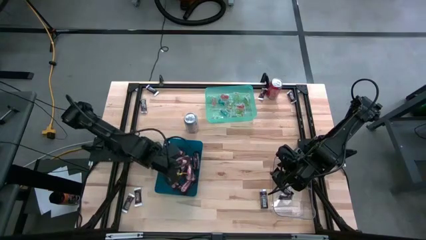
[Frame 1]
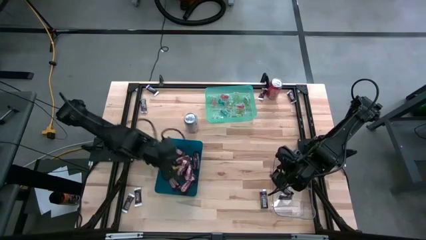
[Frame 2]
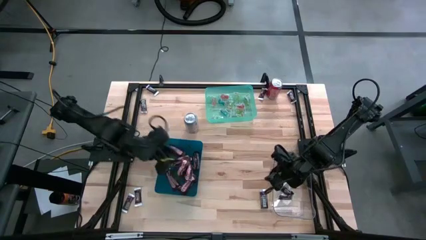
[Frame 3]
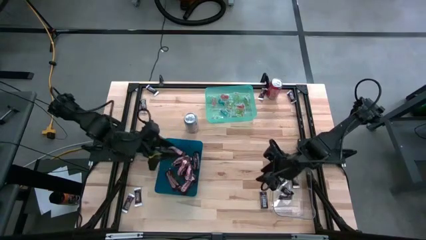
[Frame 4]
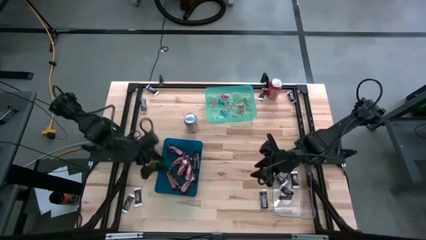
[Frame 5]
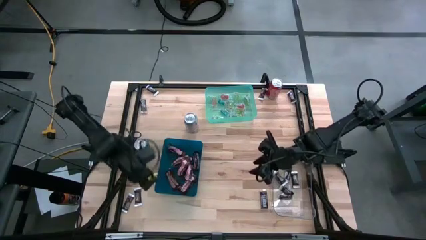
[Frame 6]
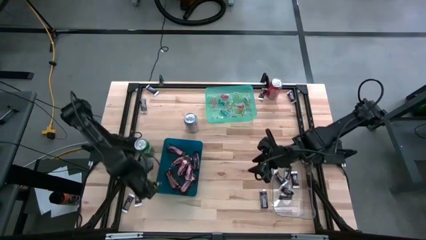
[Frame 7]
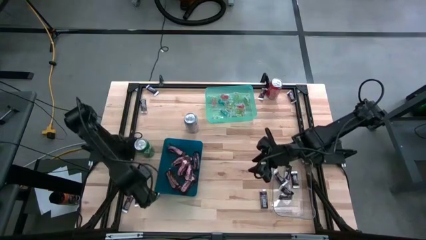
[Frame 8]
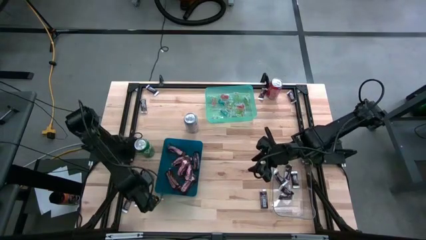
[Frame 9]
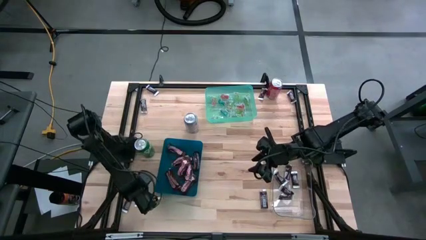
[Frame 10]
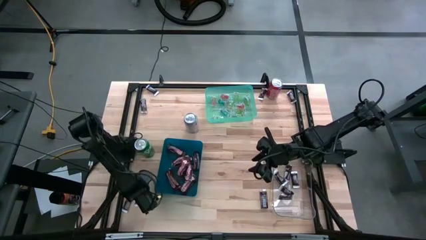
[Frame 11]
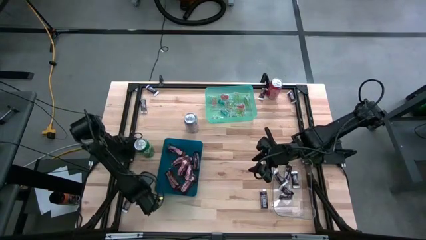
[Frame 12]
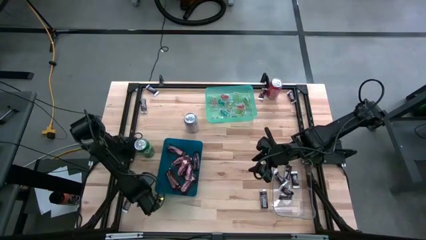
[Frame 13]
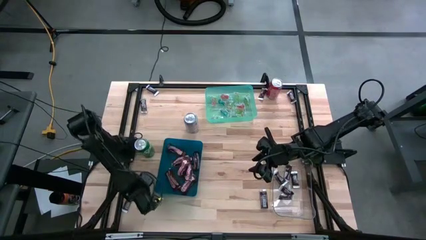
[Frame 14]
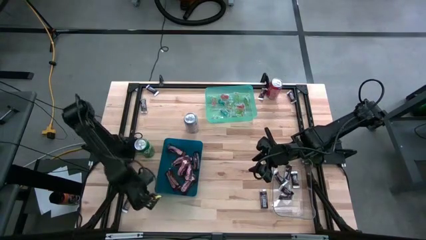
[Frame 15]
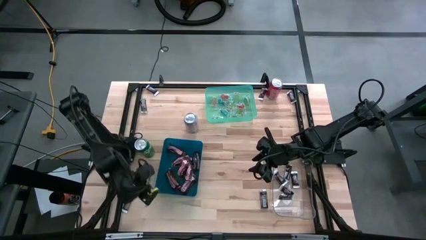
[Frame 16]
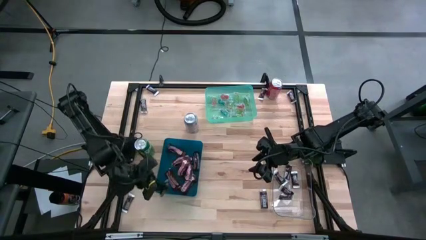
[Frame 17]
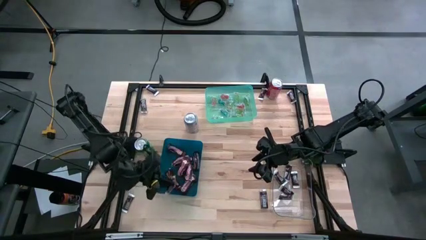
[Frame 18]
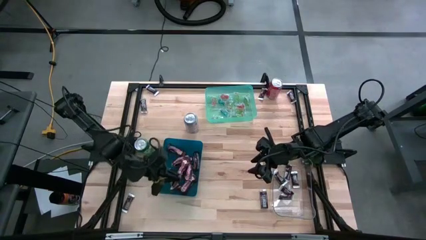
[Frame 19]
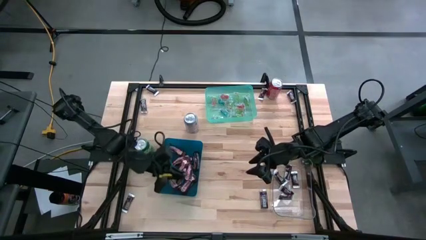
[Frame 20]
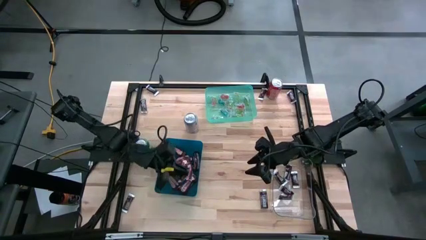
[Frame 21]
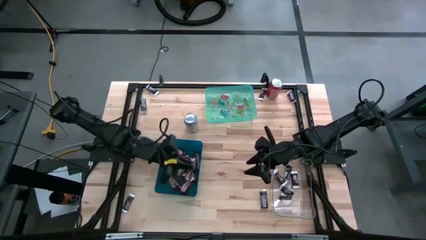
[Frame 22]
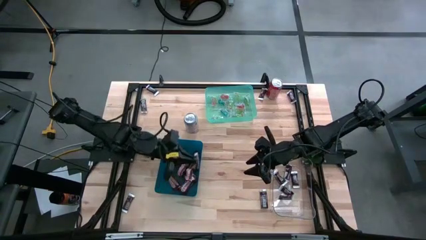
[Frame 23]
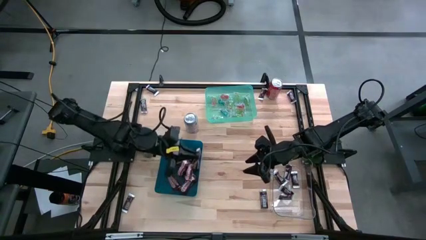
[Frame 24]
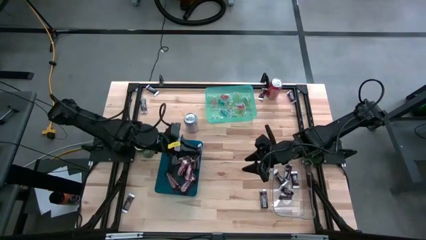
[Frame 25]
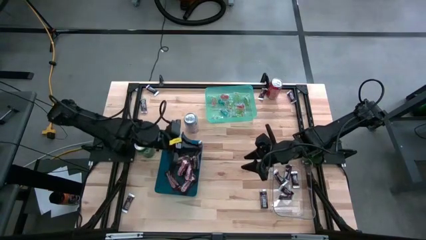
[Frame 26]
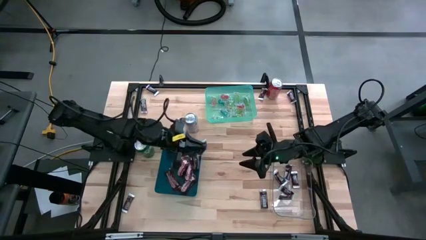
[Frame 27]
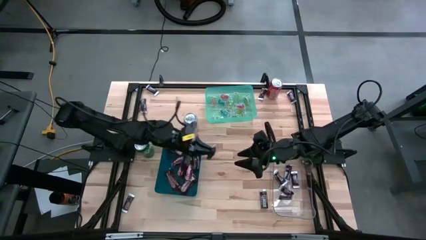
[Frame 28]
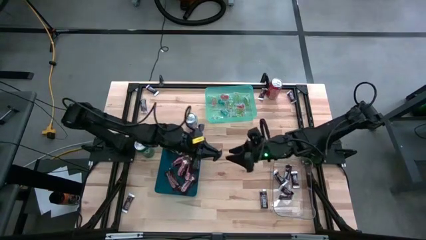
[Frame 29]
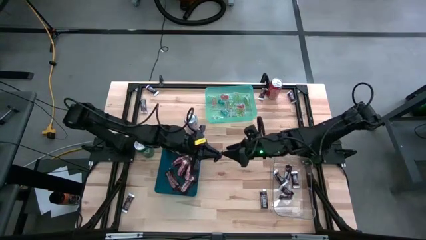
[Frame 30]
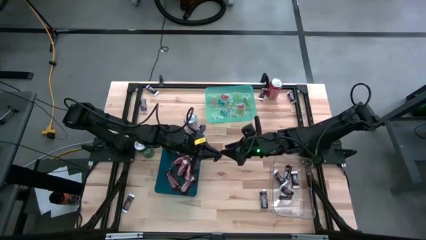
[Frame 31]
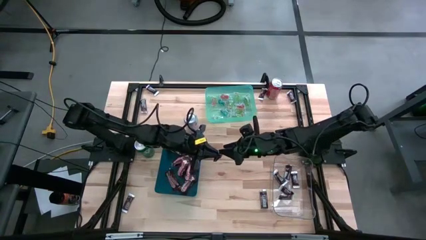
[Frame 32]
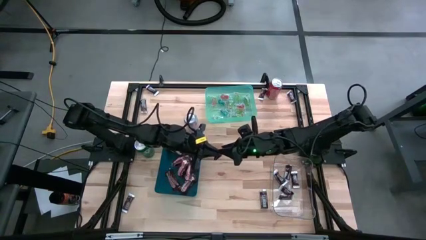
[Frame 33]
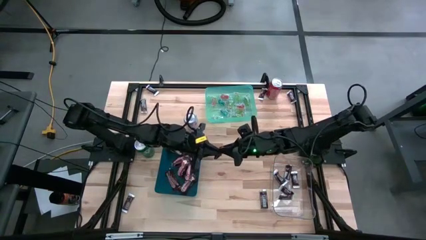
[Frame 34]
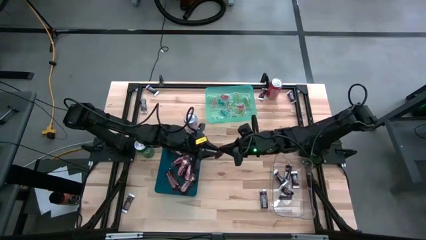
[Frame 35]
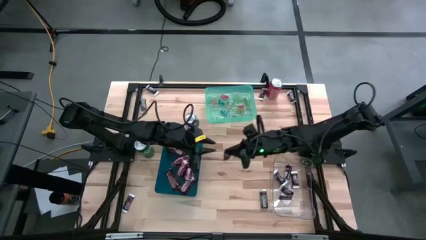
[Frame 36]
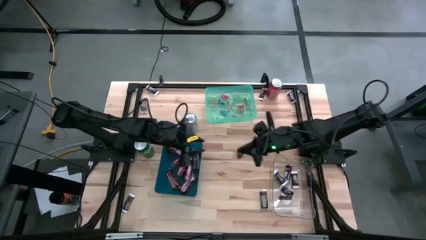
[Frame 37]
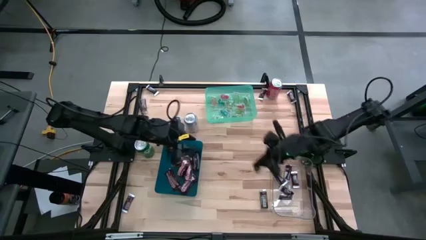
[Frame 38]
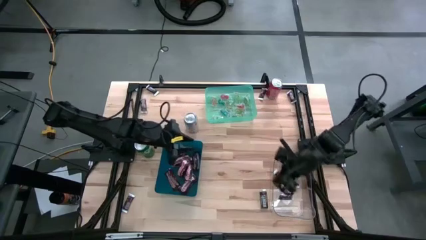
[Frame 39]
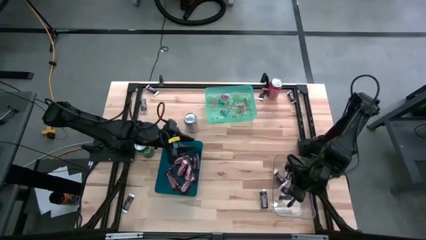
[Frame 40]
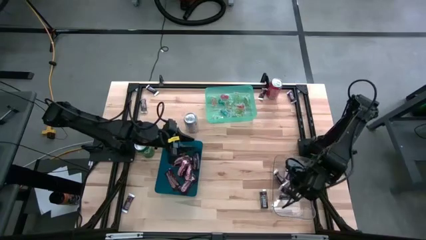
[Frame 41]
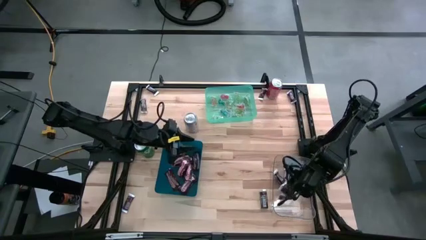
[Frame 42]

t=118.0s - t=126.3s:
Task: Organize candy in baskets
Put the dark brown chocolate bar into the transparent bin

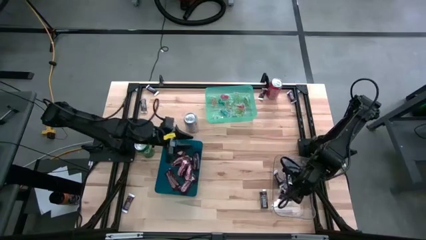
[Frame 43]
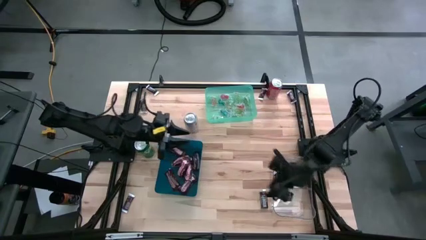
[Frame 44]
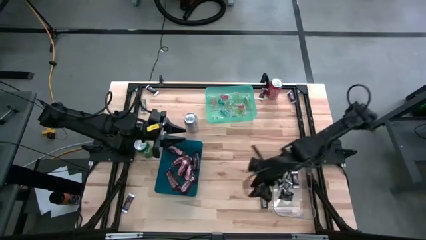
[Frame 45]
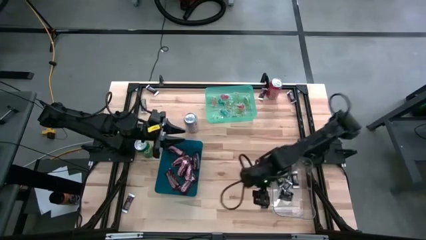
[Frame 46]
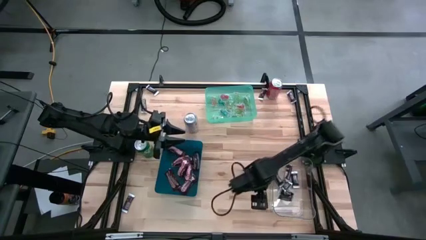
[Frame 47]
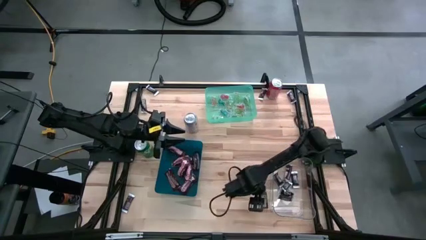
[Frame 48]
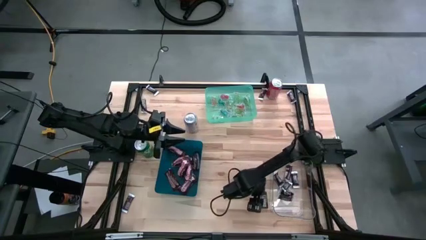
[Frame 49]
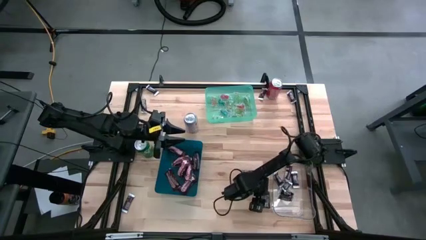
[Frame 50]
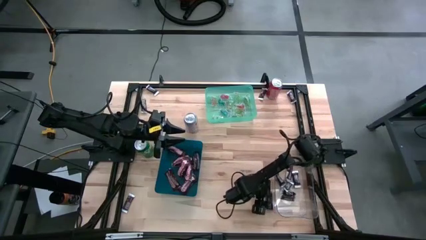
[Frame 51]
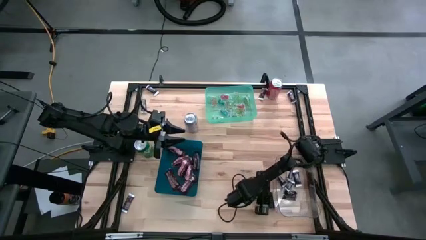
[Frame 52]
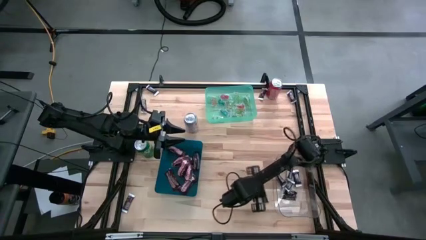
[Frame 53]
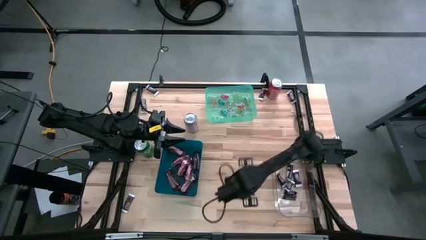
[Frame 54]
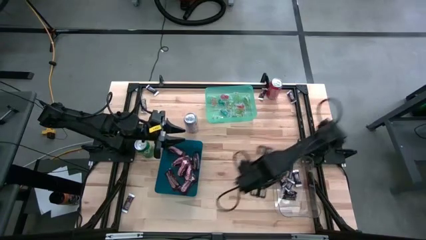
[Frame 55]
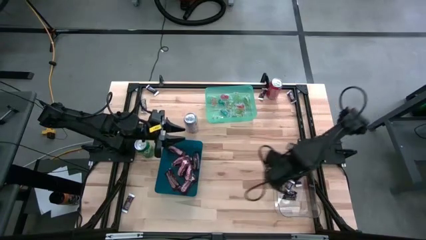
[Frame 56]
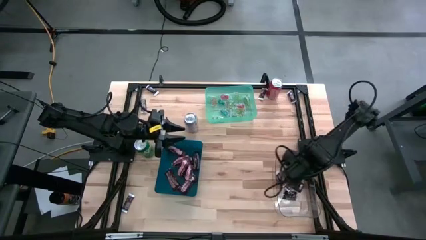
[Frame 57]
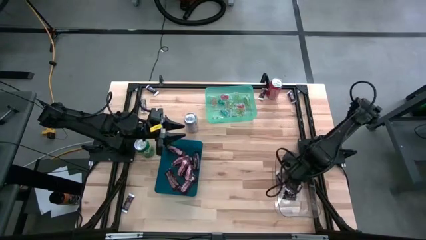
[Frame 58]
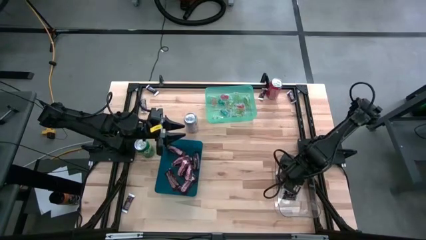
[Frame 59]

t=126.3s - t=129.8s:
Put the dark brown chocolate bar into the transparent bin

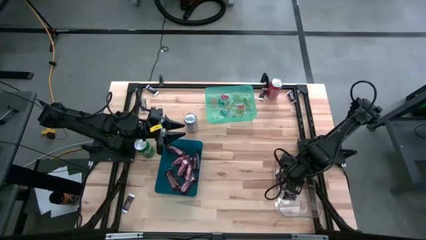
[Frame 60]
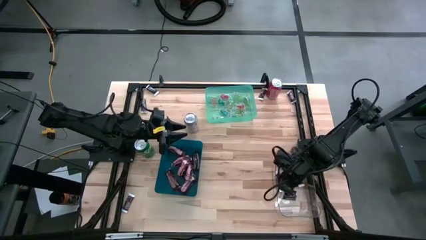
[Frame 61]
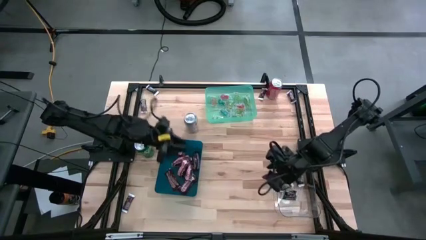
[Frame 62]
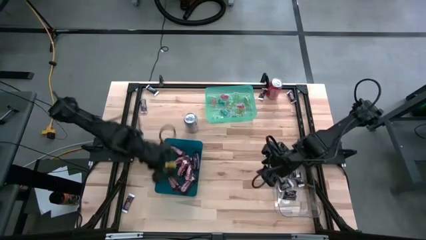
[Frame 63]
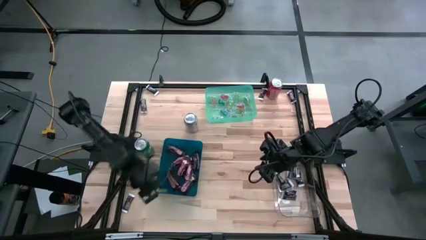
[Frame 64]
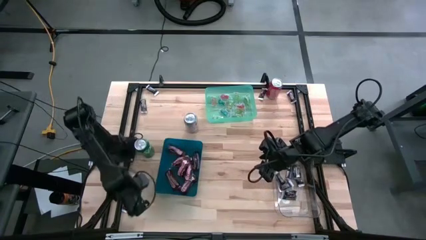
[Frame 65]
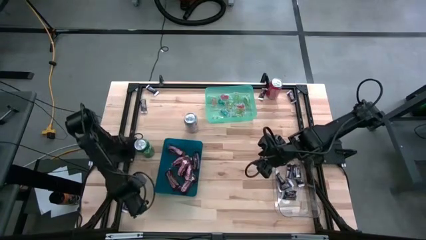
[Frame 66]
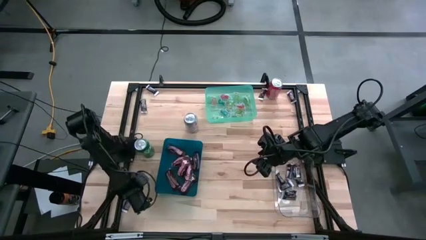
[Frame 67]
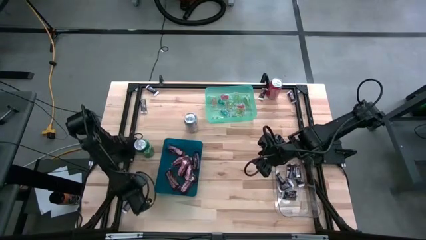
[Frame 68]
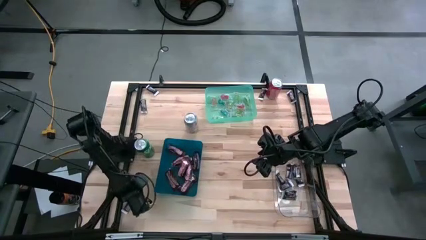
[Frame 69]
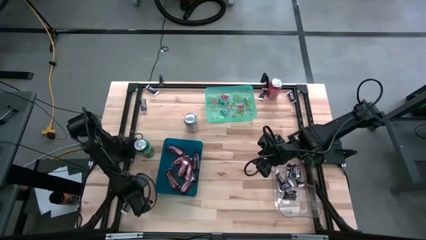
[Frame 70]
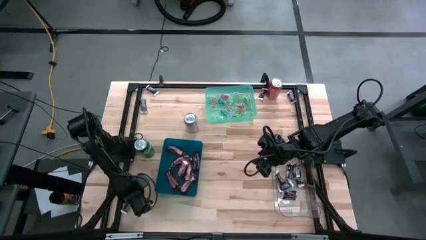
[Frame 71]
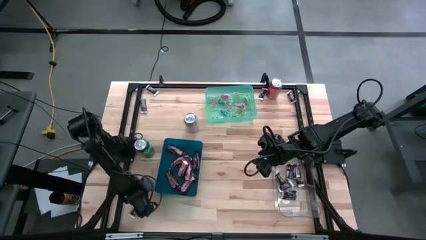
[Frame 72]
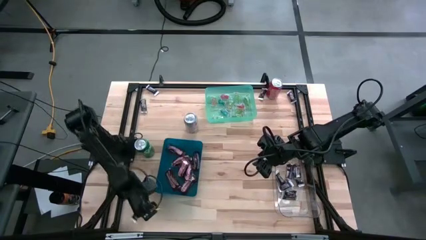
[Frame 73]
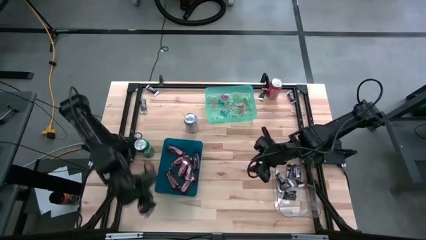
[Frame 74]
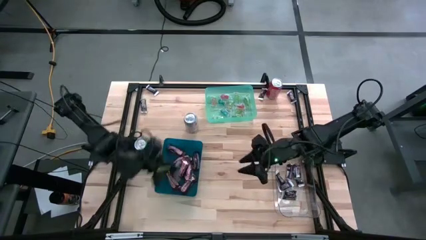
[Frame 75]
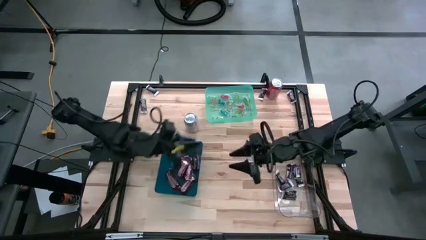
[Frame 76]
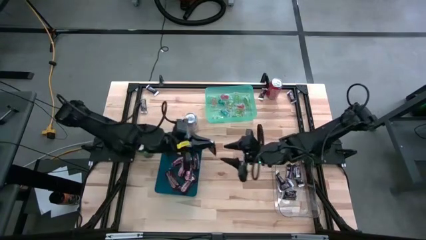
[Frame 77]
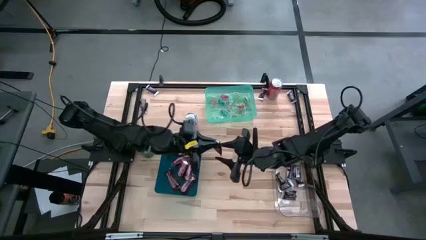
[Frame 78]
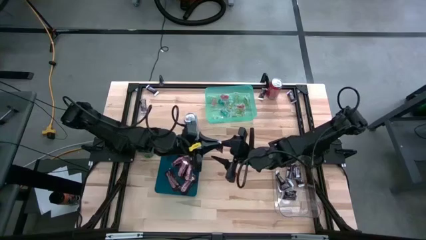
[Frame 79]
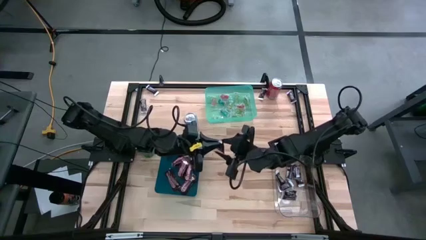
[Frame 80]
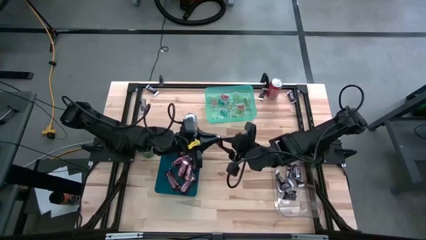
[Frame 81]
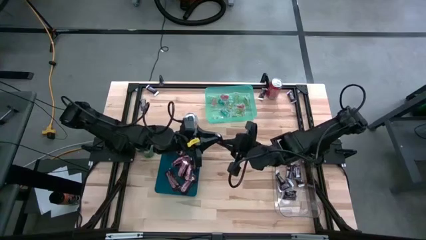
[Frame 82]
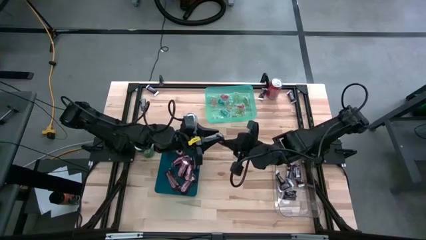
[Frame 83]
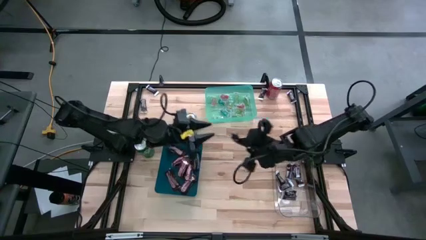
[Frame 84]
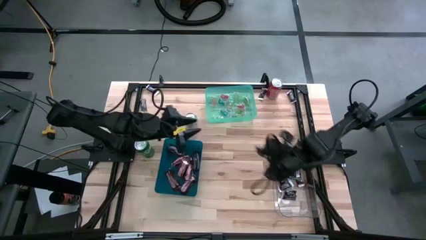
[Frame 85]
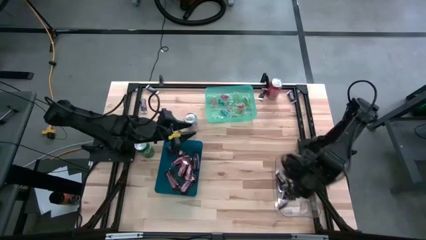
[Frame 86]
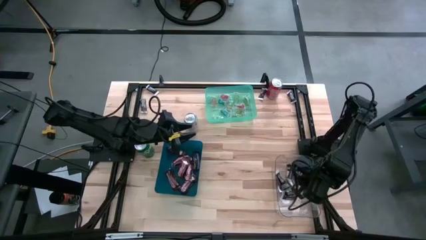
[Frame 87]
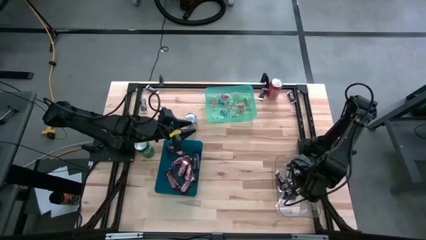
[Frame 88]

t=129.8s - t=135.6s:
Put the dark brown chocolate bar into the transparent bin
